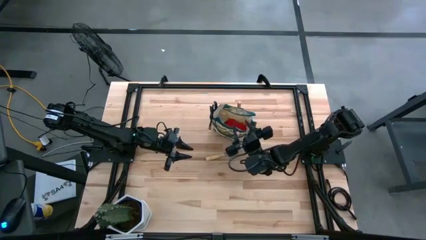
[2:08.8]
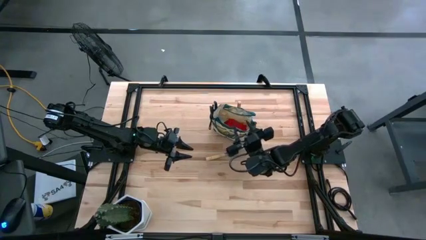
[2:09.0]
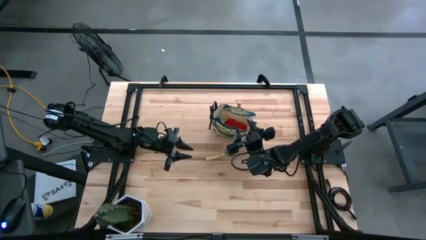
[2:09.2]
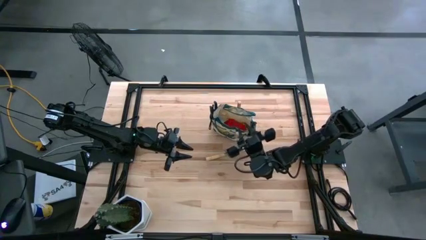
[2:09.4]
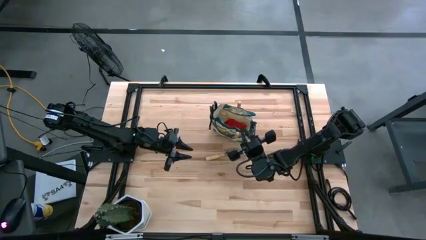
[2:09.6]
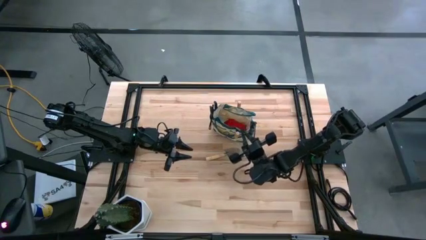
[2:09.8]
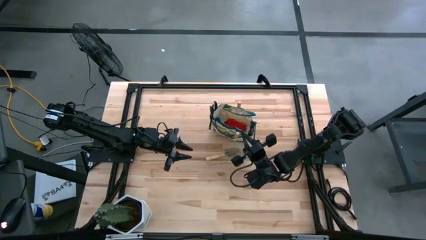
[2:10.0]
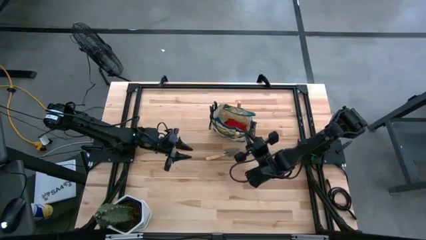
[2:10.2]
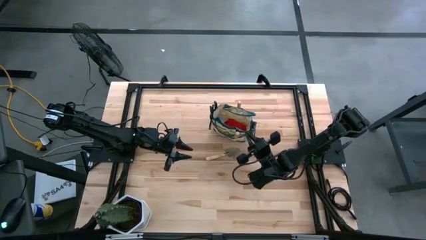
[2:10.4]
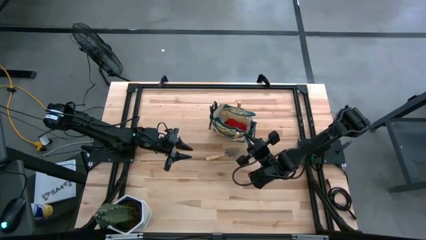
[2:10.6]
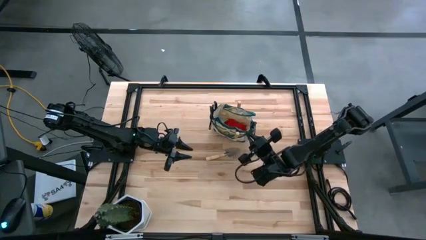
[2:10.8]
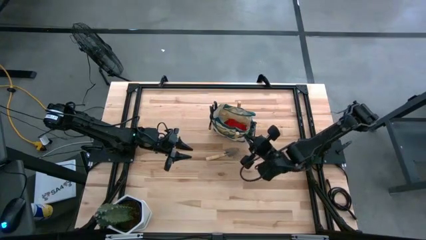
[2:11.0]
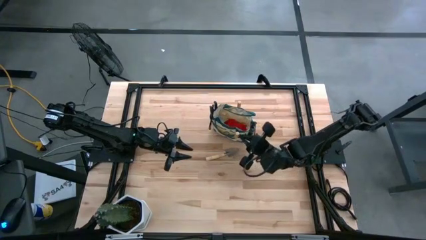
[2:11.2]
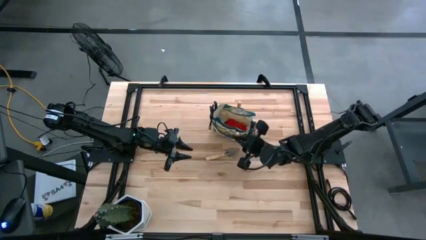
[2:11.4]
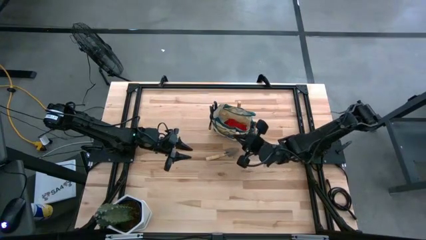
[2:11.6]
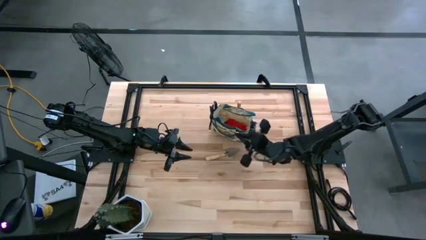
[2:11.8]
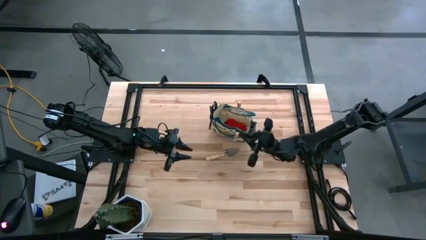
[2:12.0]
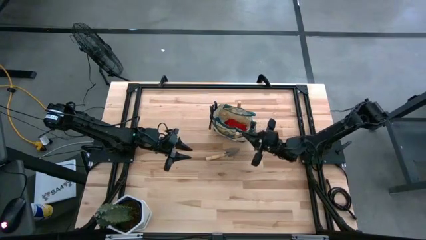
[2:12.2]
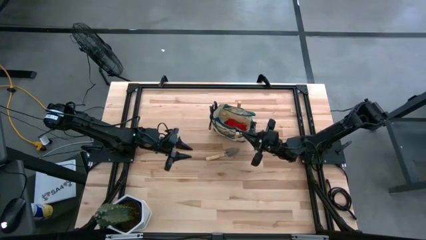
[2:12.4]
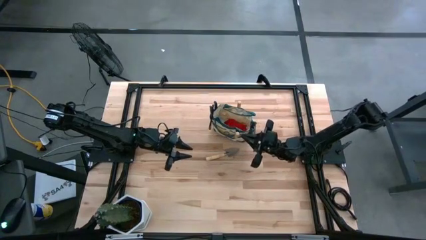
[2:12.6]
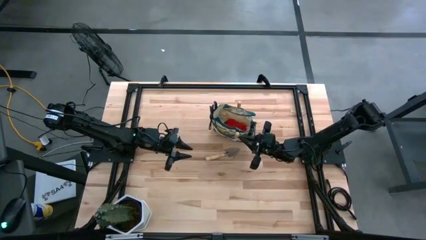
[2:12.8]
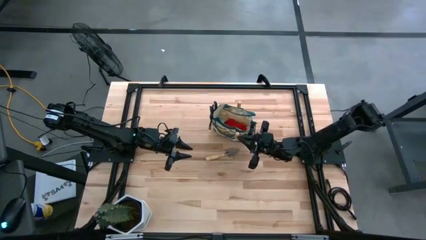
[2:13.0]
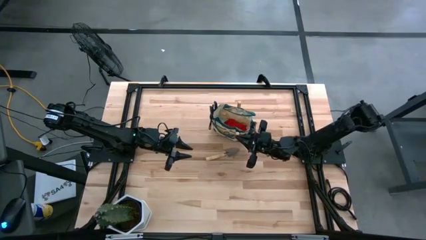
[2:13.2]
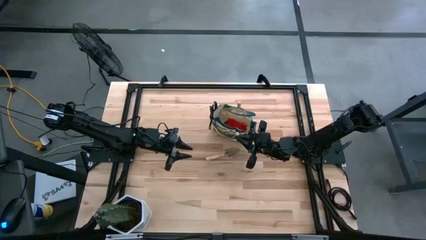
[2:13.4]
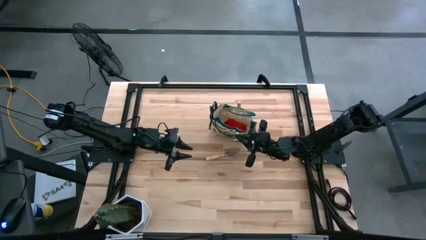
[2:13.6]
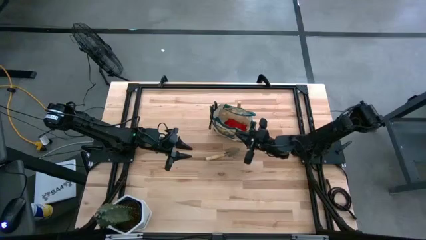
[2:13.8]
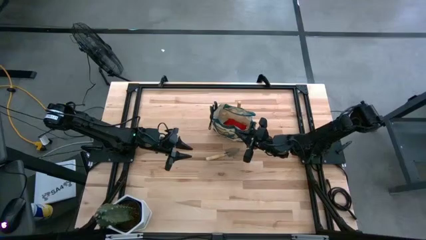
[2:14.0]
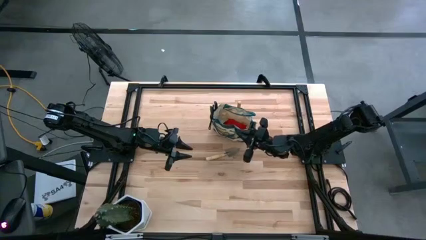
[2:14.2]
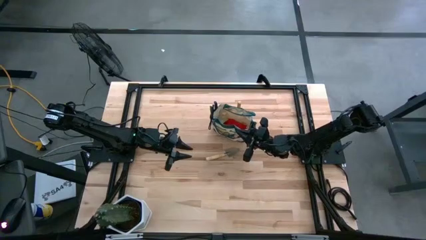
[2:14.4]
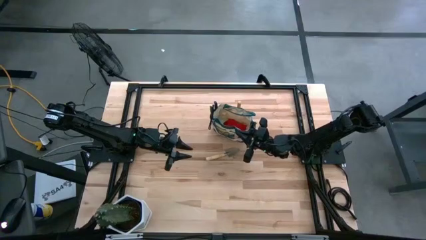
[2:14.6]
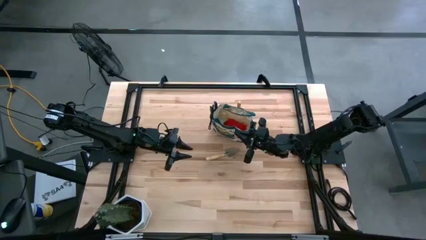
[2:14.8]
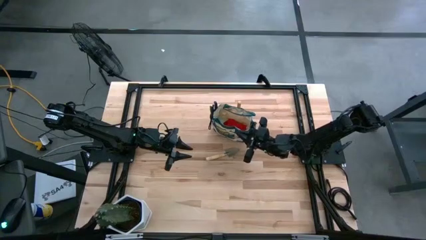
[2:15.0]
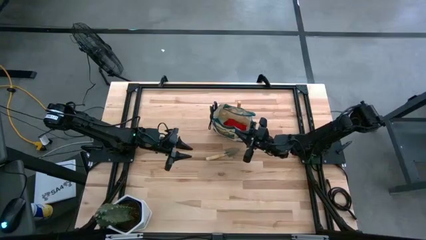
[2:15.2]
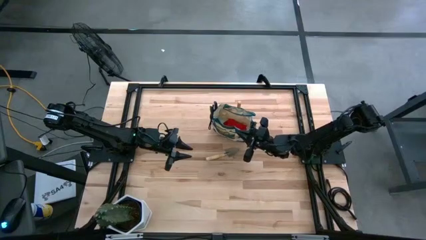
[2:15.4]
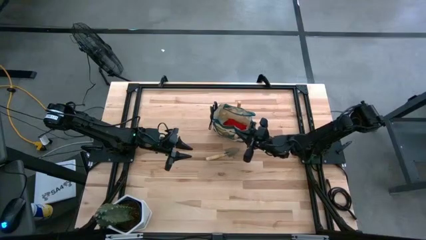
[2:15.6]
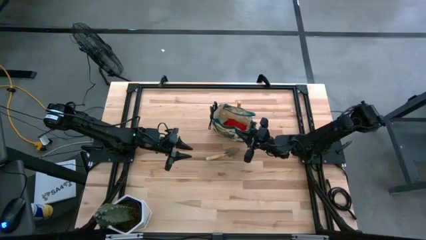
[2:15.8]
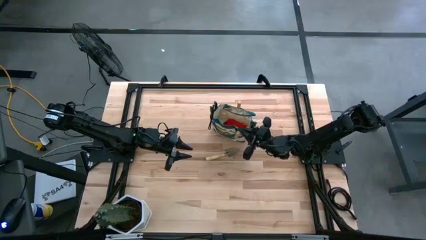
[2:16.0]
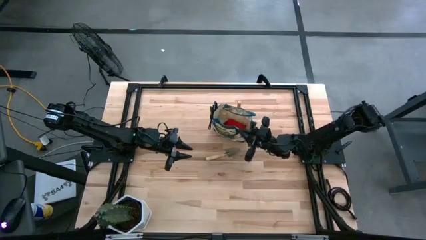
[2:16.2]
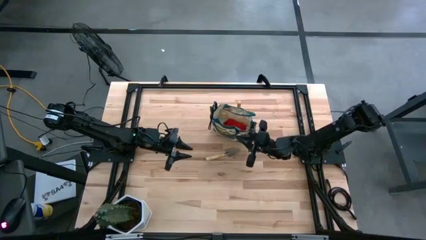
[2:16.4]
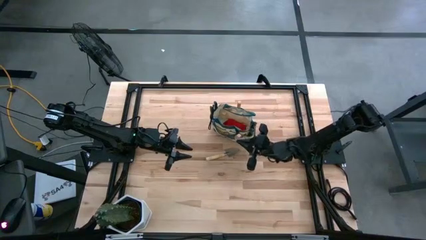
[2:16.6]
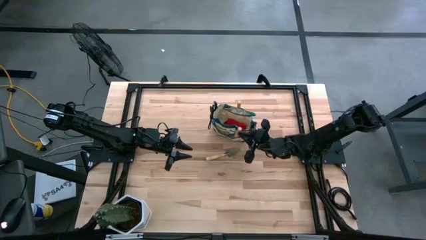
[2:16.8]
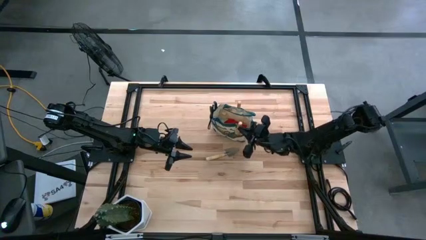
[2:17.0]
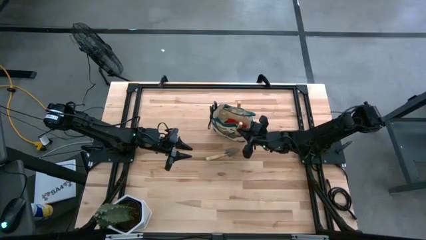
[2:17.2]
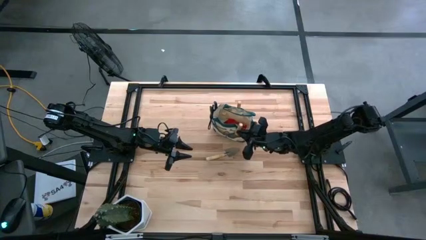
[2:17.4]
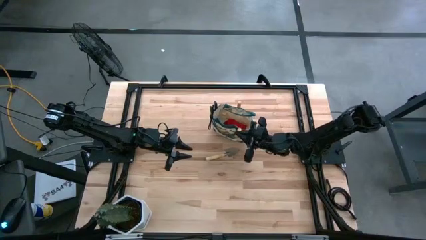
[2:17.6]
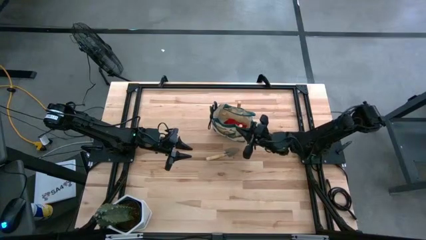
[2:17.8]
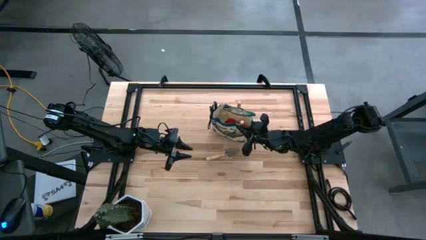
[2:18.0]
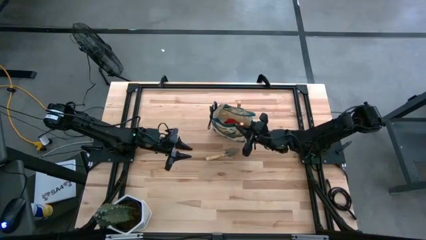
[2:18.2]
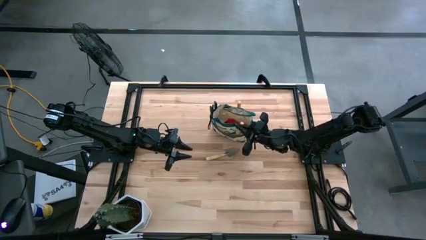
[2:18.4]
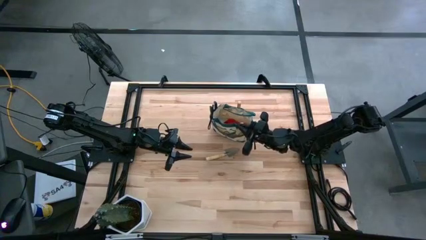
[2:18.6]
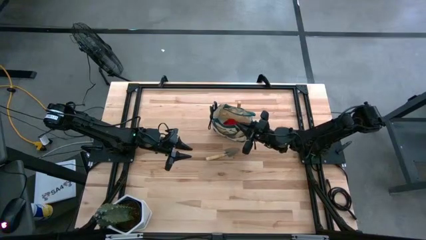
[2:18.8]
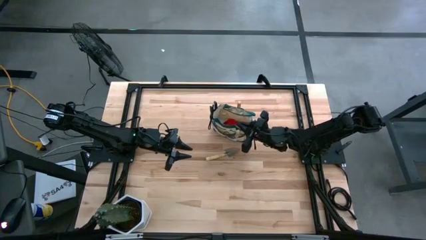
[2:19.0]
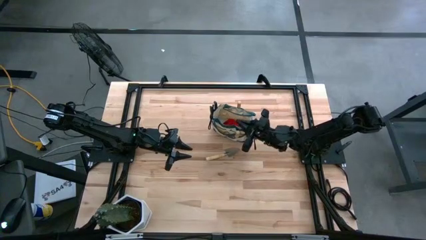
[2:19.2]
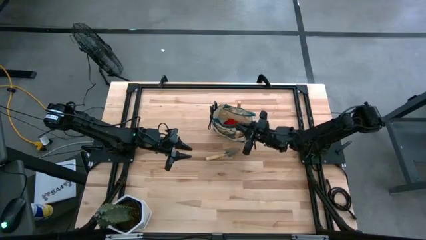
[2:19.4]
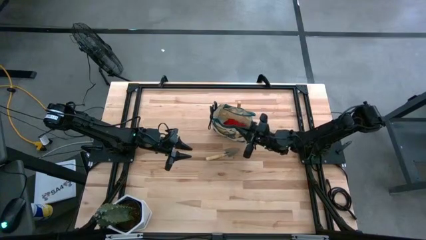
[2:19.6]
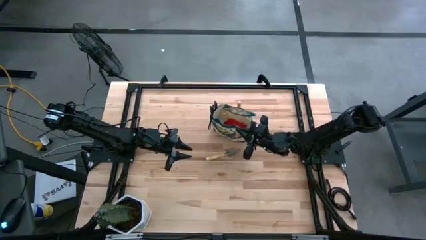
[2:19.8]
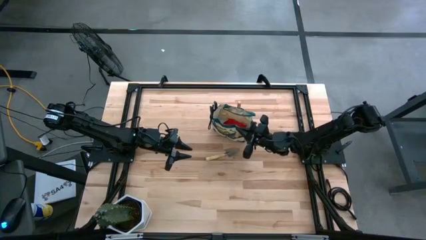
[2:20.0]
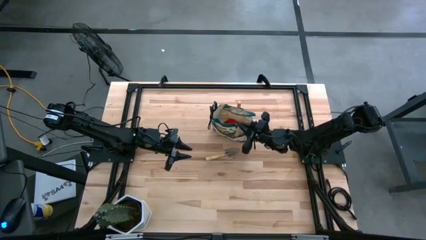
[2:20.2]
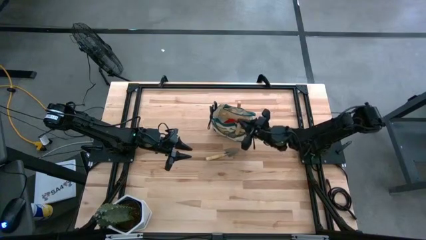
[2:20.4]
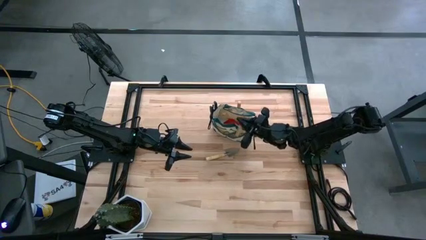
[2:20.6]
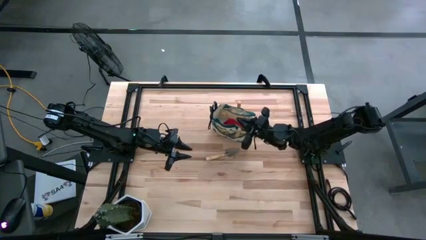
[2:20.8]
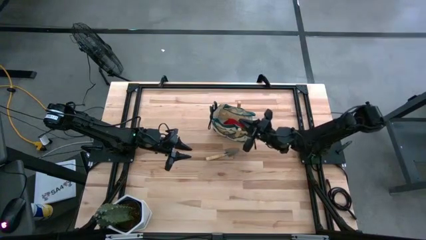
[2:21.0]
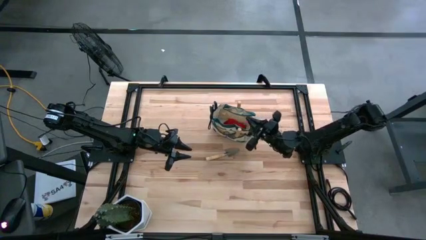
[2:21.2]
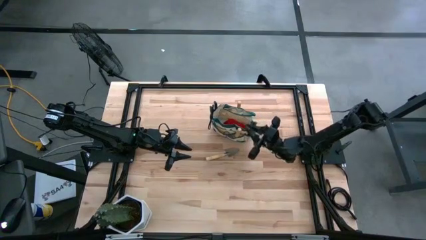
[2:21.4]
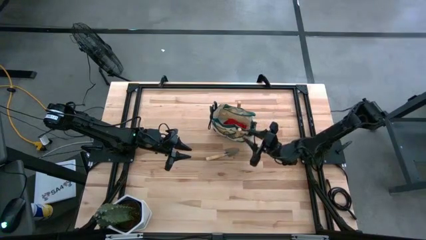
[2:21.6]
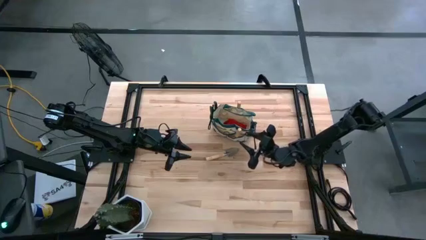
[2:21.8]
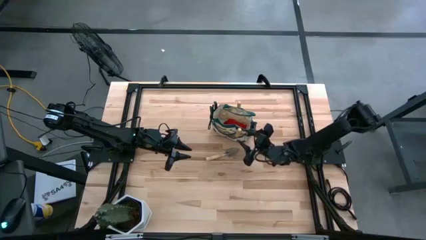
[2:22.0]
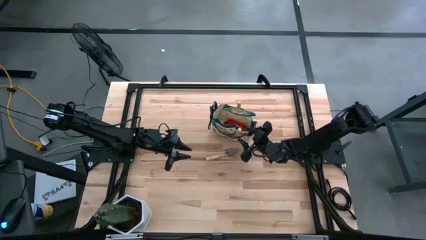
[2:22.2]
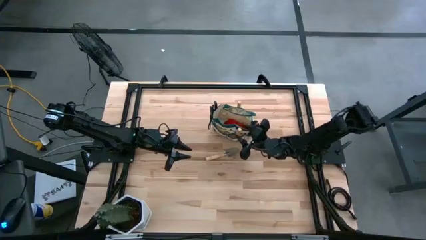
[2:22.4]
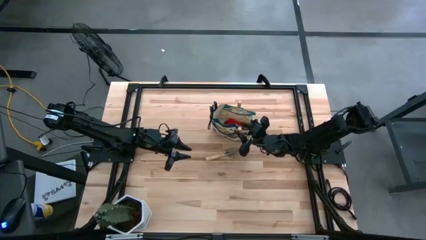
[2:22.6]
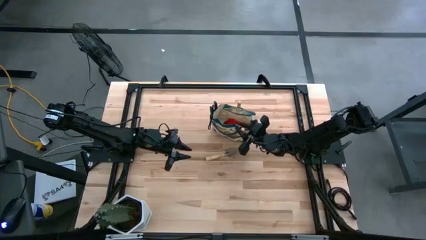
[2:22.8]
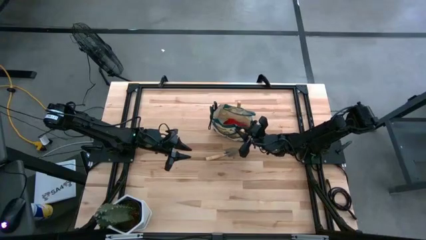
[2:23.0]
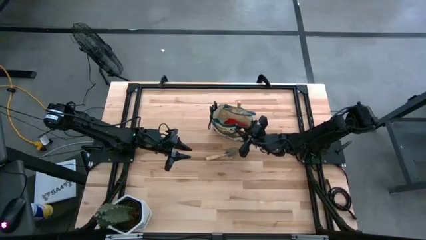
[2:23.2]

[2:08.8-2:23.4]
Task: Pick & Place Garden tools in Gardening bag
Put the left brown trowel into the gardening bag

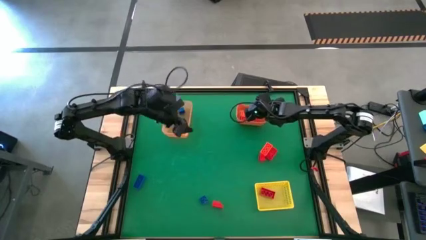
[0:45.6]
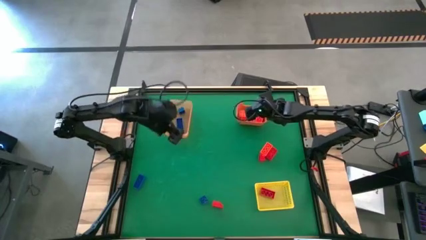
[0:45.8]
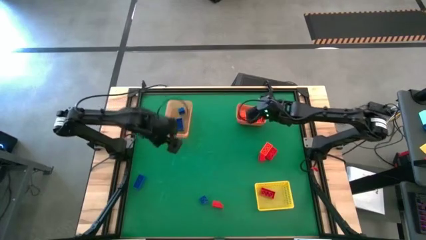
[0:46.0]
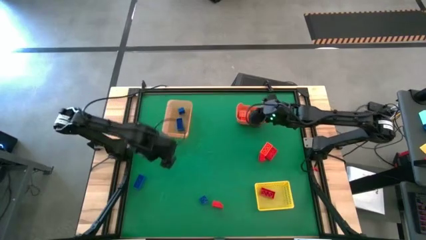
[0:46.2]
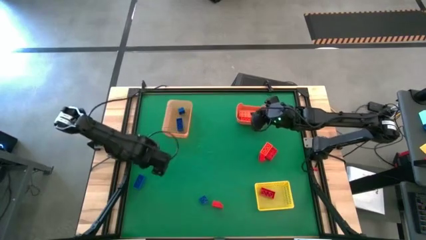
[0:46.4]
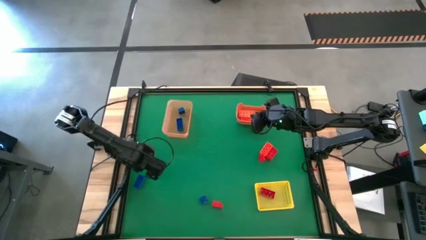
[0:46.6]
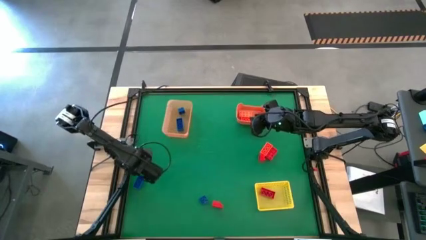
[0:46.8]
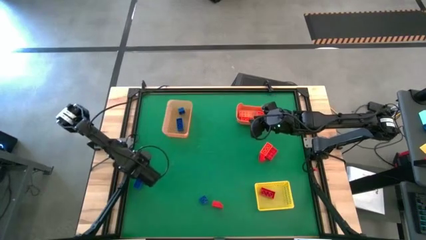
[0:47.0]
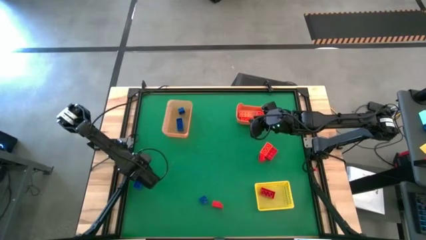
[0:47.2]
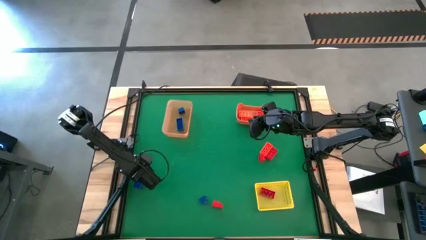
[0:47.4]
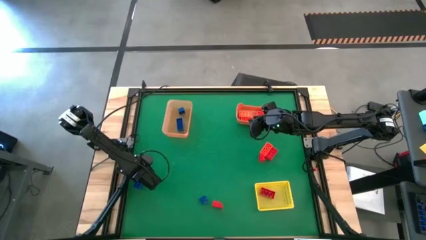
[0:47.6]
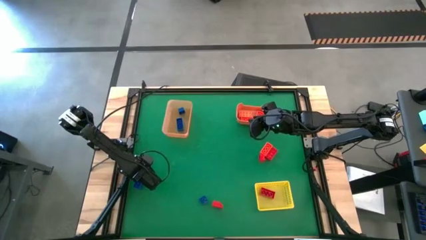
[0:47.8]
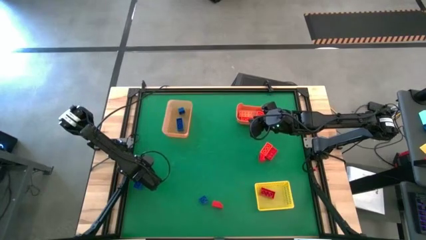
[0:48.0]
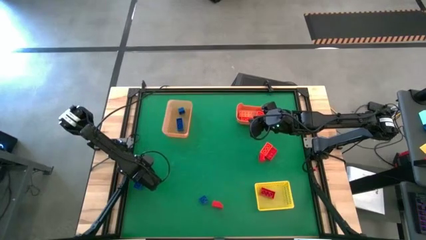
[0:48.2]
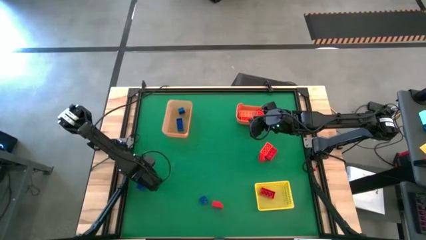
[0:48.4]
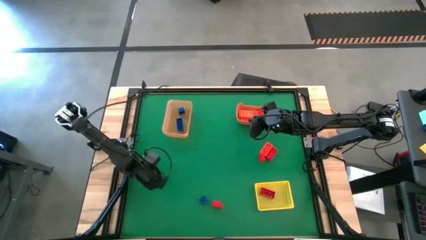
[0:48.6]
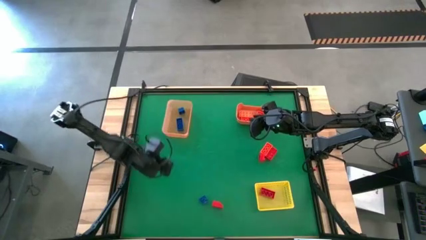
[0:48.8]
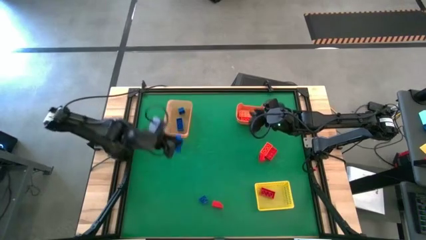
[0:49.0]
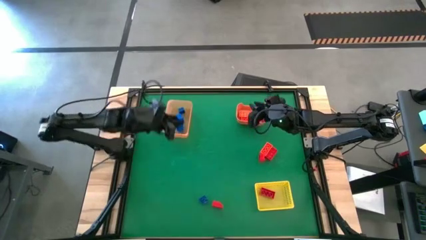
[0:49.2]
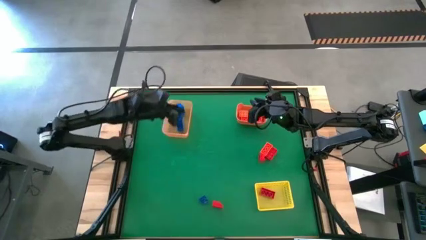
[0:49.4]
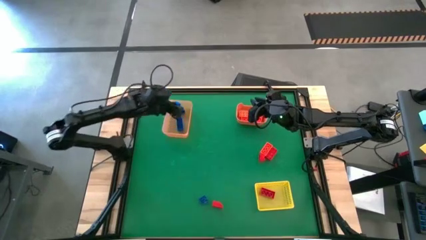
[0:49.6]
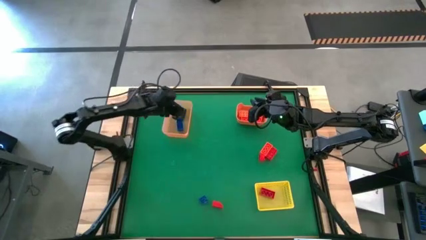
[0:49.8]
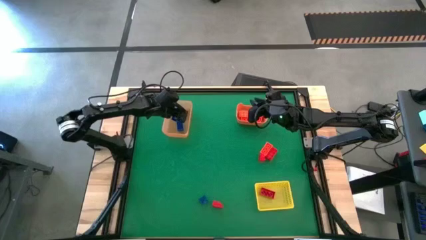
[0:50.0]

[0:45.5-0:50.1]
Task: Sort & place blocks by color
Put the blue game piece into the light orange bin
